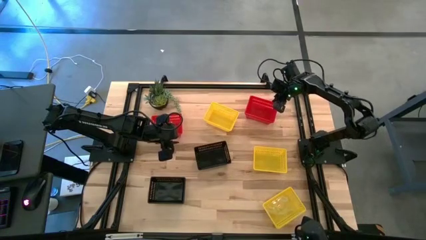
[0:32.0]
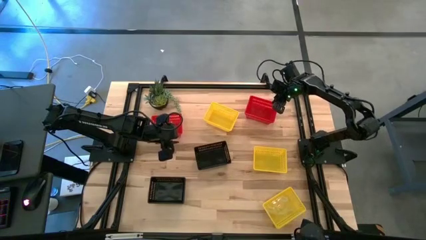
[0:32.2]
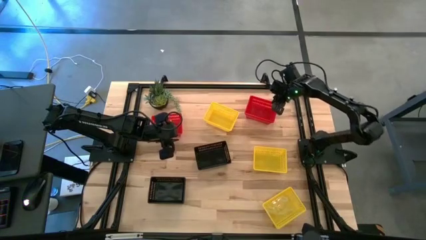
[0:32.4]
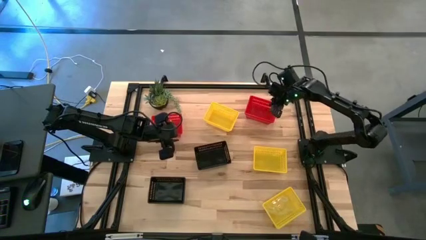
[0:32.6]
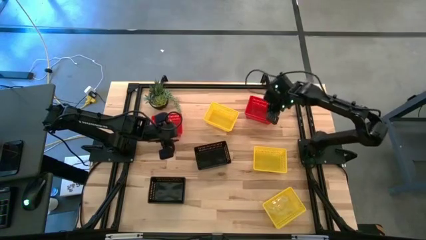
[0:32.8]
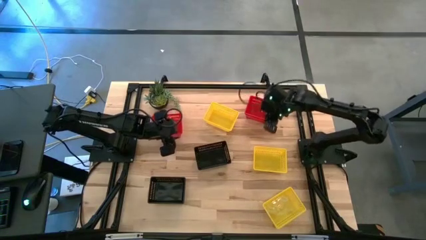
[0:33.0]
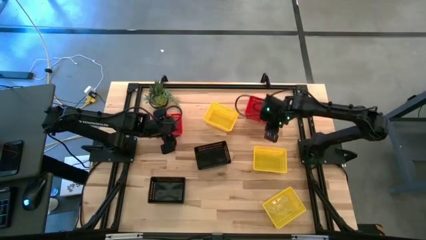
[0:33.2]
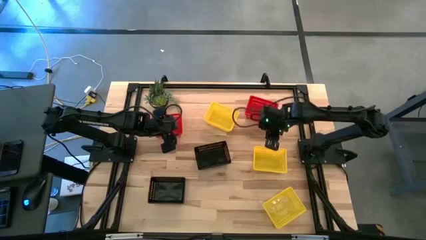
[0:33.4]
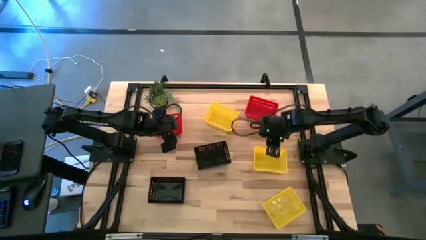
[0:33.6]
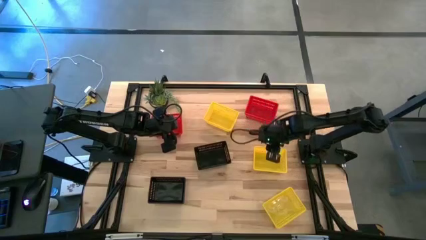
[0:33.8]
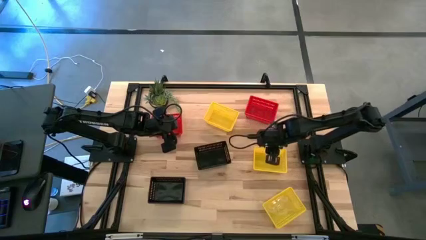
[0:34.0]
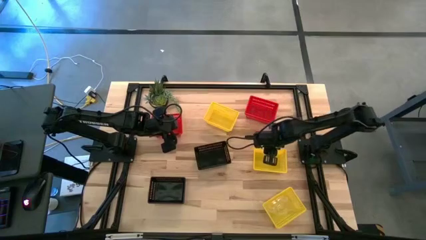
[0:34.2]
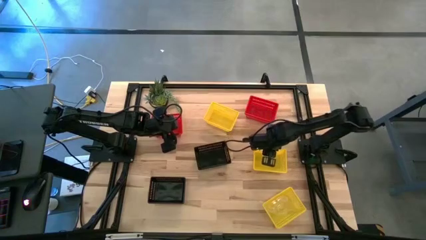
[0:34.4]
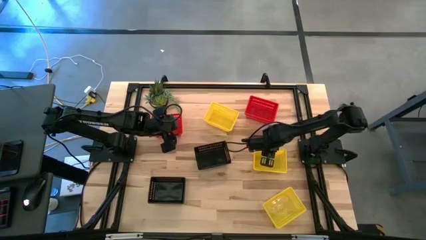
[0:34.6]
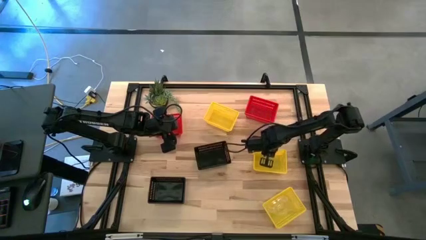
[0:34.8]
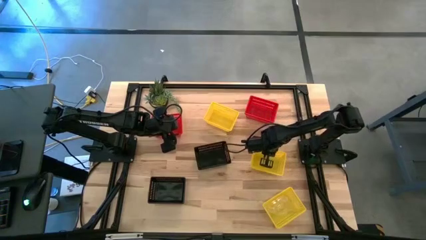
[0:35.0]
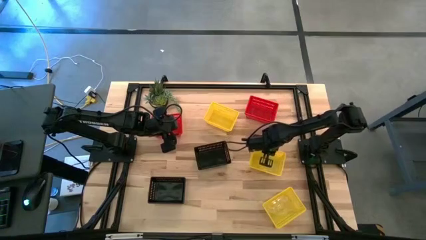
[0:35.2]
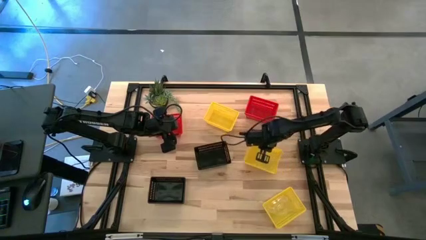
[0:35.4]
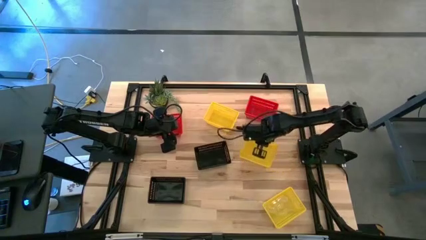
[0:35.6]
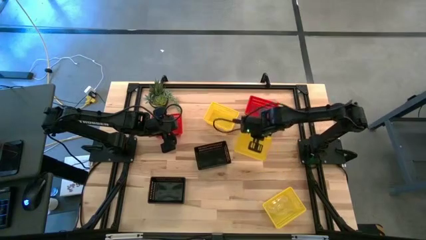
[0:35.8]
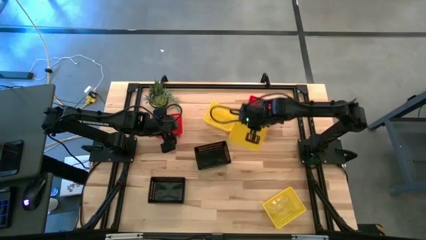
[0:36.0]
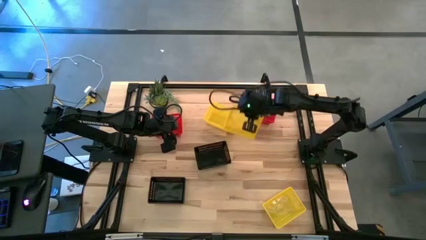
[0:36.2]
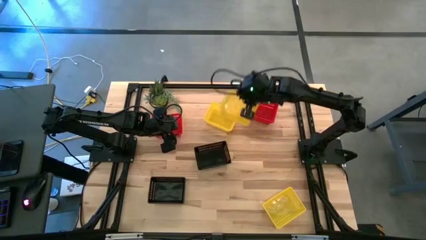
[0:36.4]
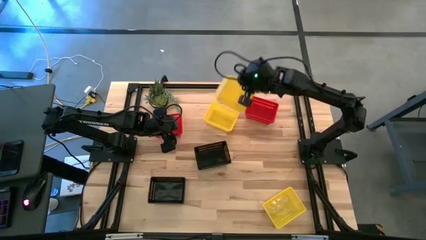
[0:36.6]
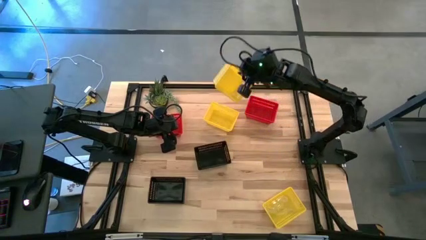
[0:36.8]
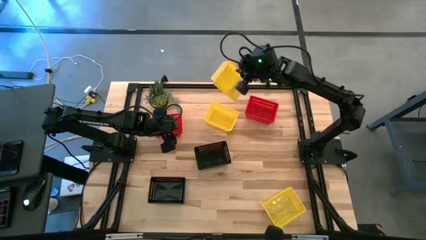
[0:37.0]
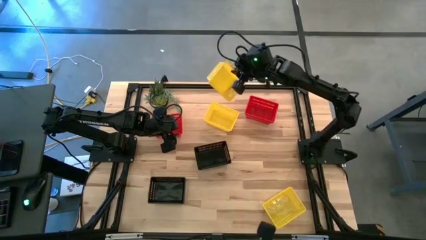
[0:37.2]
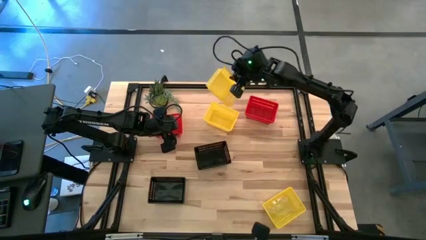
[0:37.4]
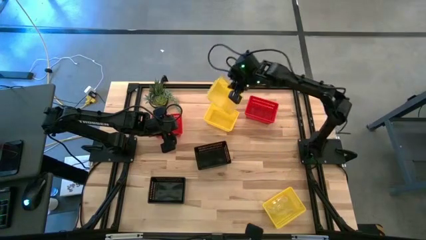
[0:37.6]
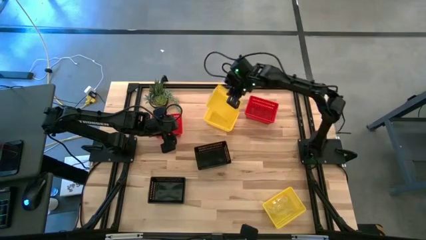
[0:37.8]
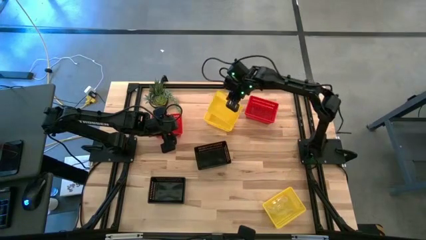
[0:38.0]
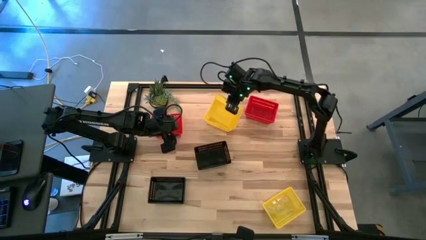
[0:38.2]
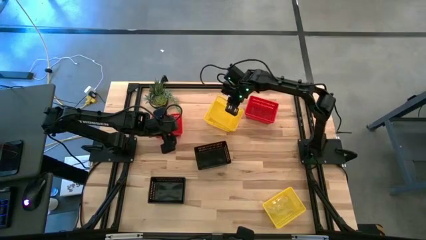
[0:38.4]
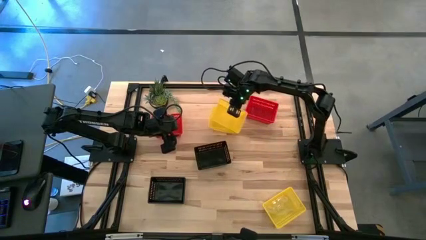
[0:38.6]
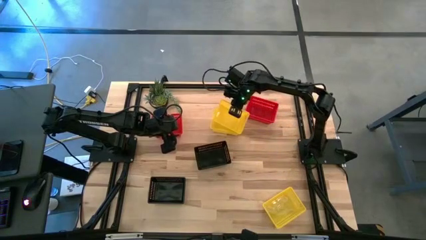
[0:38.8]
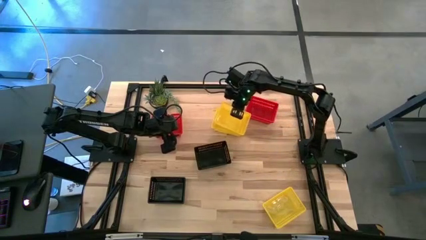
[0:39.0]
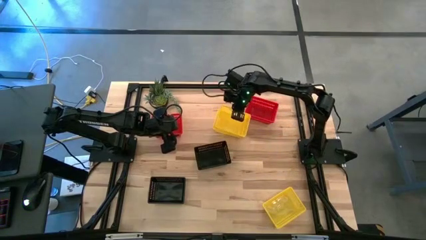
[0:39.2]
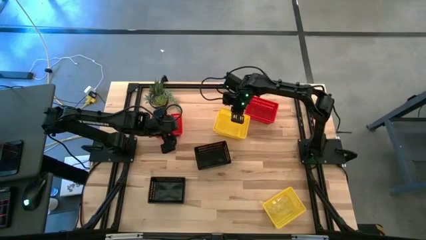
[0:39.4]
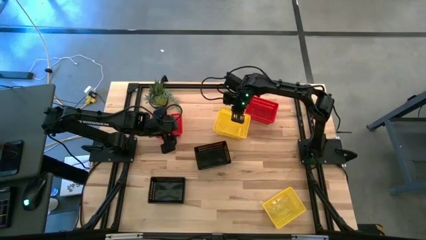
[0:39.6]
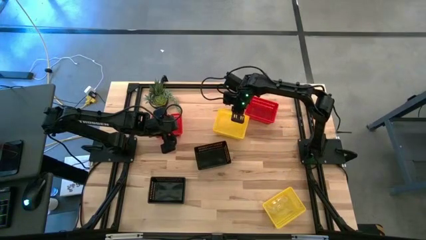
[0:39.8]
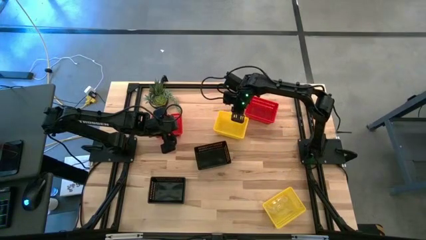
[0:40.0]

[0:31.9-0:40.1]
Stack the middle yellow bin on top of the top yellow bin

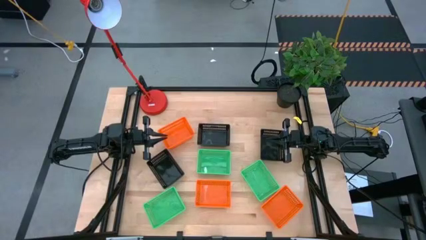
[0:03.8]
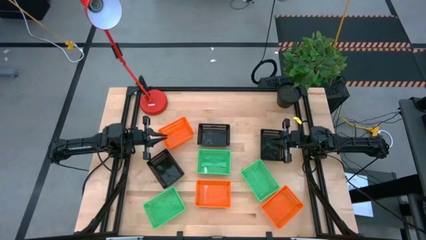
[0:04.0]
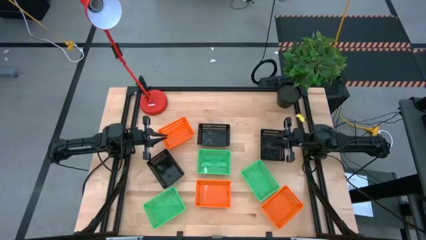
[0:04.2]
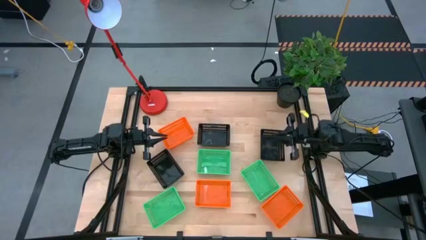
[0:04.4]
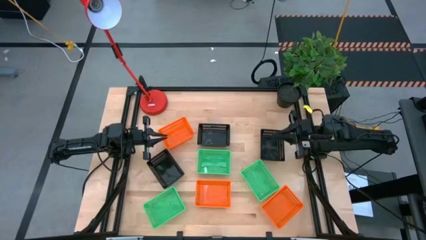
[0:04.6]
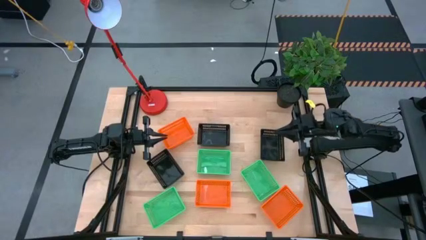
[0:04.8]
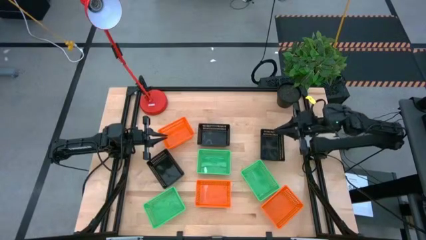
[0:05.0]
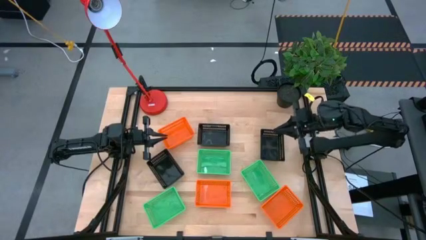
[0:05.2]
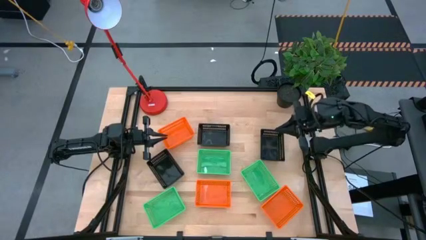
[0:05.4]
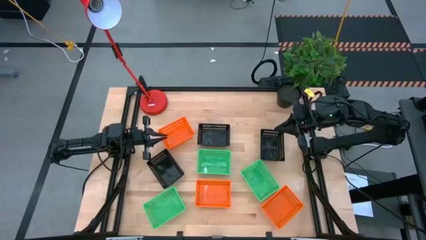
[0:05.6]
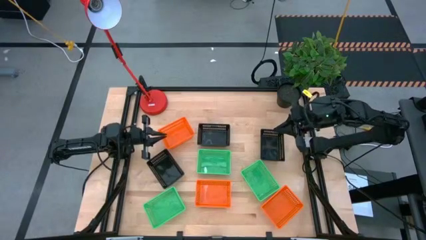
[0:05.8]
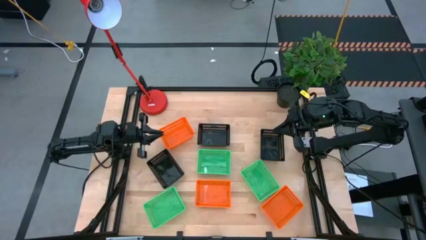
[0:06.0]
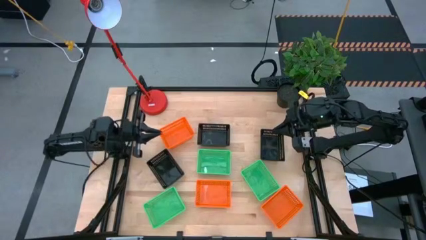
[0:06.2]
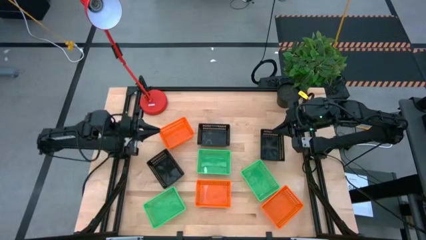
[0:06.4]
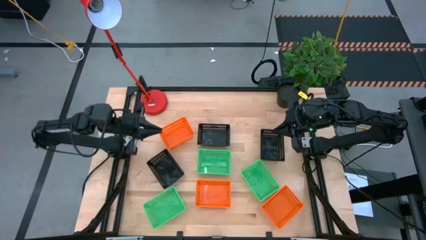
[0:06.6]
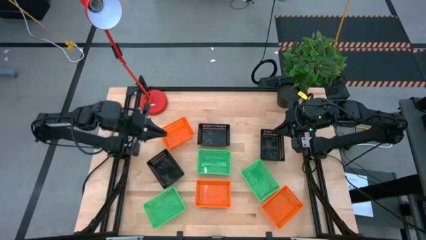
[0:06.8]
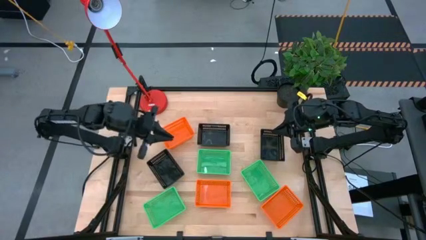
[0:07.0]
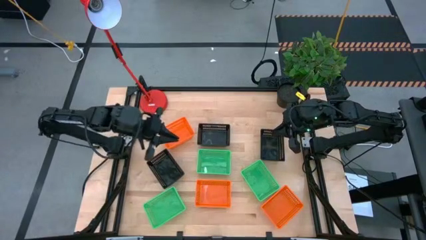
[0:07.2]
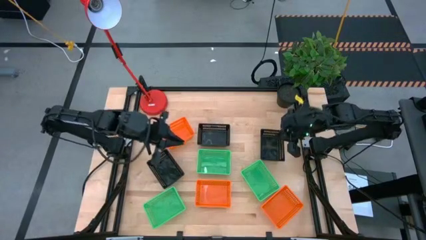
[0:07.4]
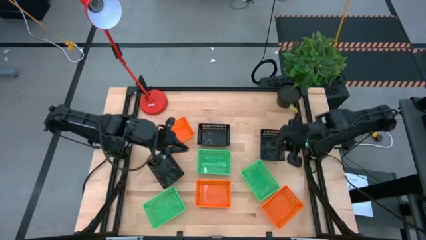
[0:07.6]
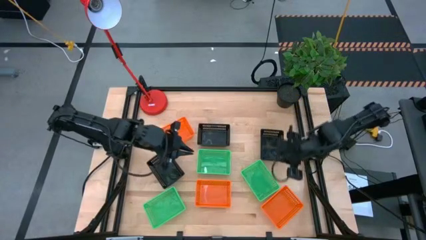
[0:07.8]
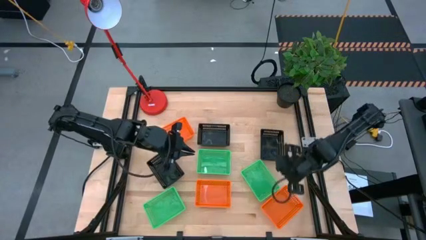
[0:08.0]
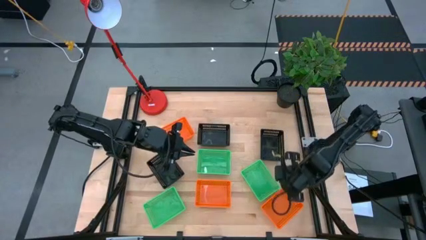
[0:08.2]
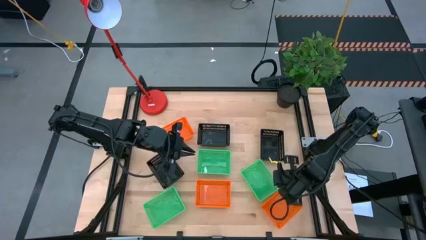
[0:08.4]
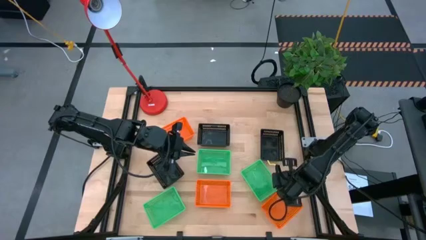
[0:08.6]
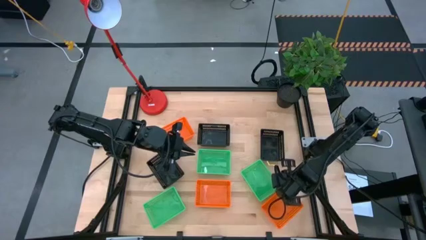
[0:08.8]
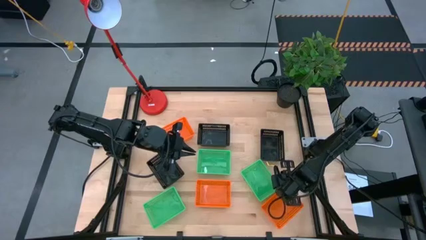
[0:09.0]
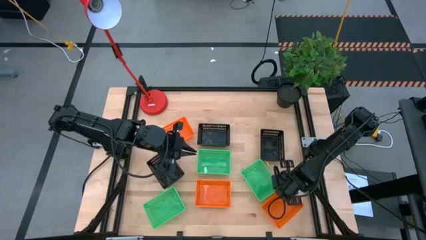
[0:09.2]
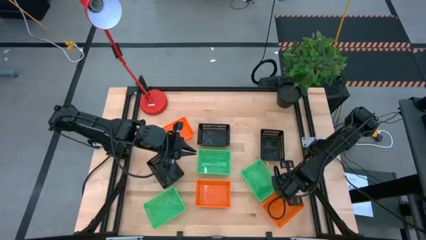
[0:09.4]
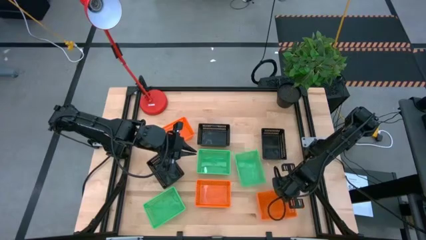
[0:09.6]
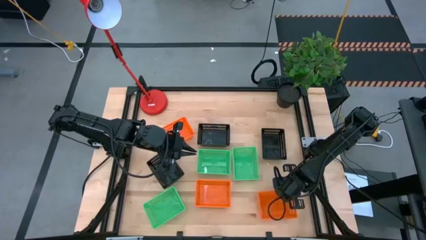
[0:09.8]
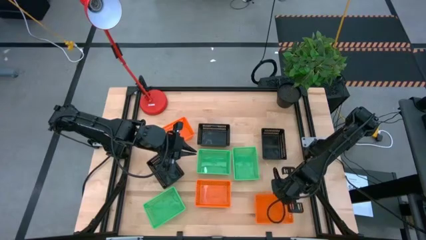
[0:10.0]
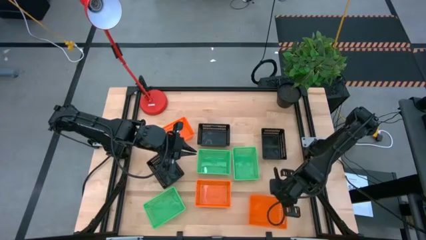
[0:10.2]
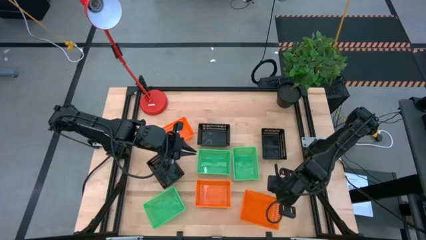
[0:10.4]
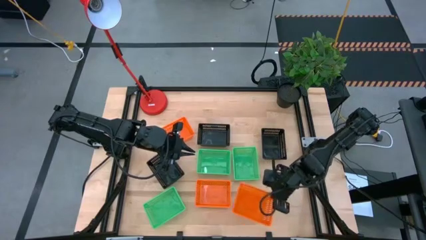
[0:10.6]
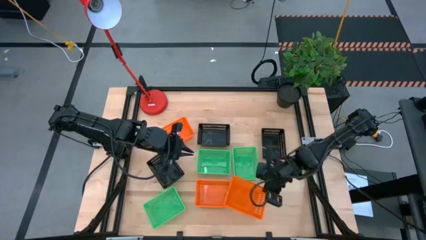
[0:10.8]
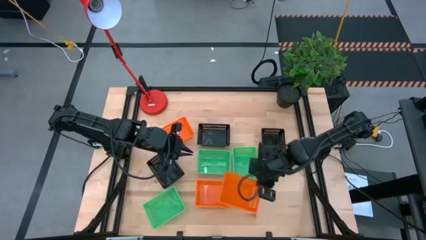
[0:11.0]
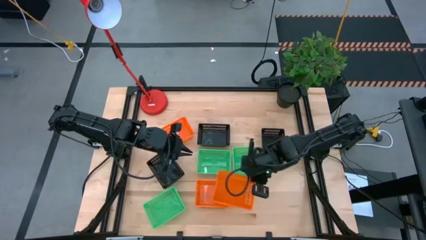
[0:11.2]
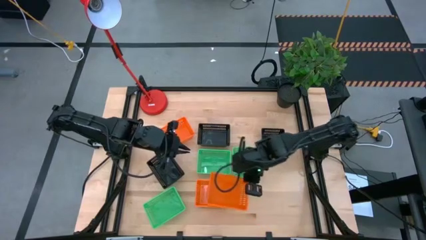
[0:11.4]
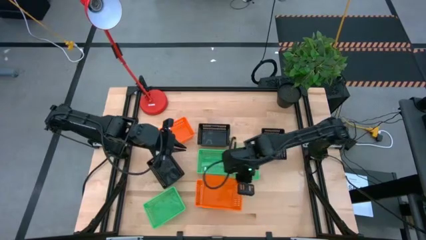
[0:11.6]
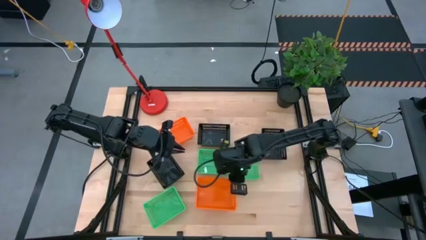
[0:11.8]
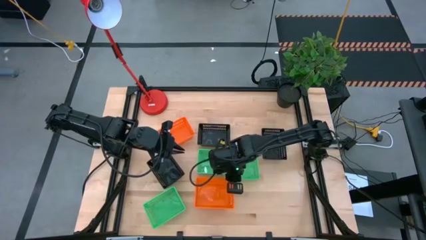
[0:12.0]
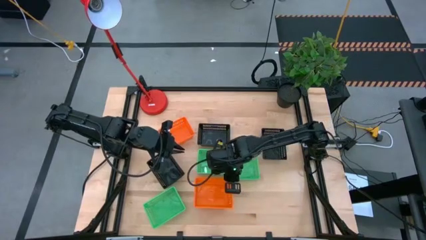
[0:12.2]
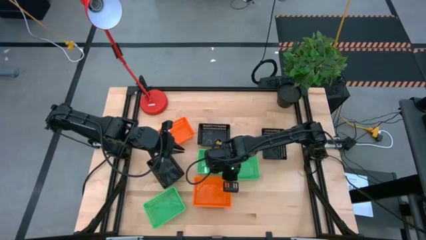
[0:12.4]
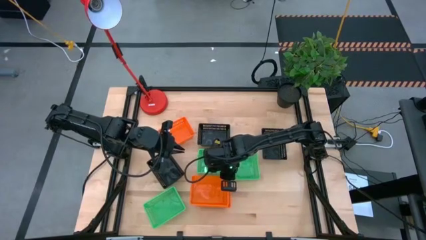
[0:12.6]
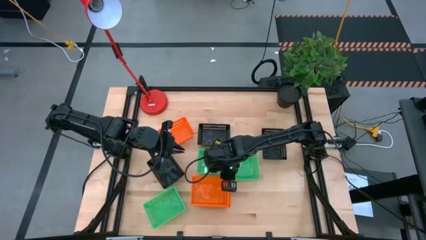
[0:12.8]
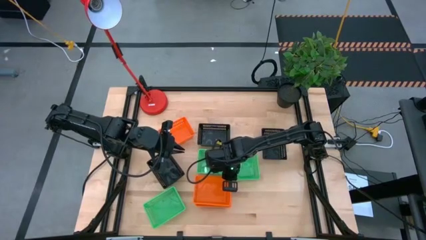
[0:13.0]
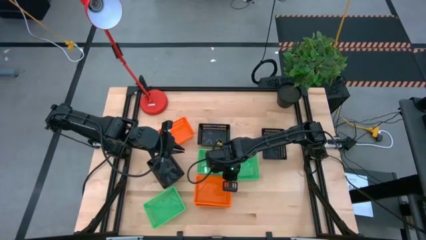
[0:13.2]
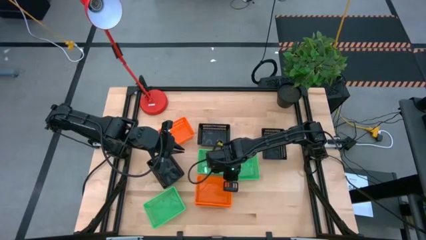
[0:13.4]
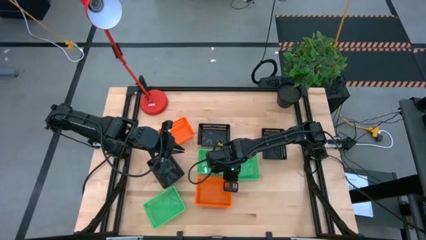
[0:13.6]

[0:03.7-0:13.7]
Stack the right orange bin on top of the left orange bin
